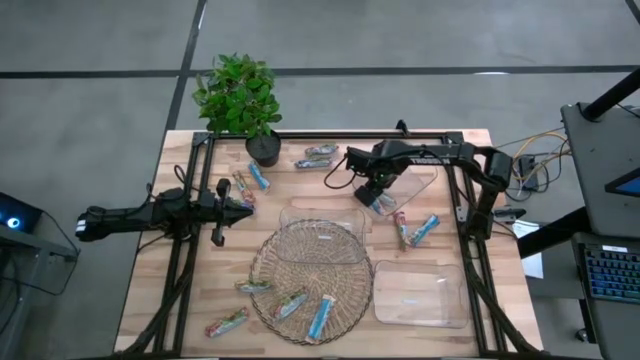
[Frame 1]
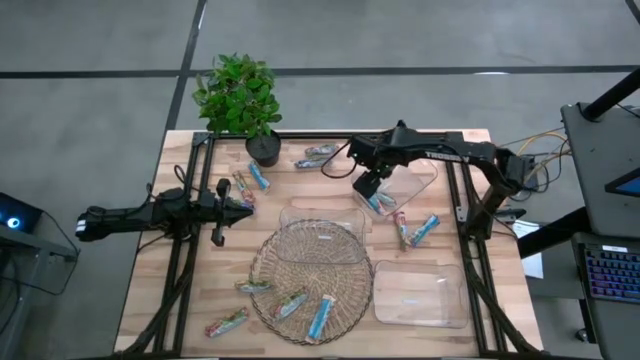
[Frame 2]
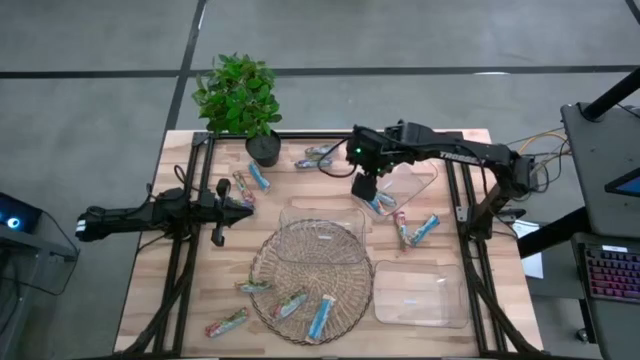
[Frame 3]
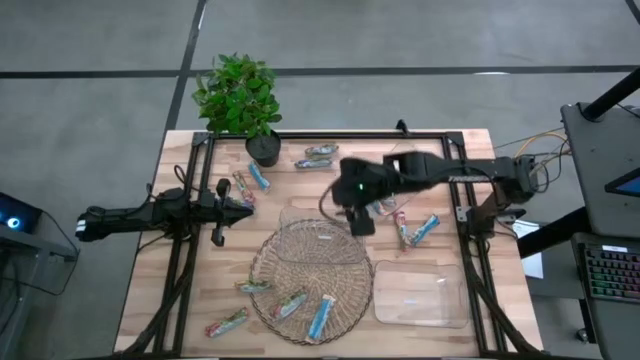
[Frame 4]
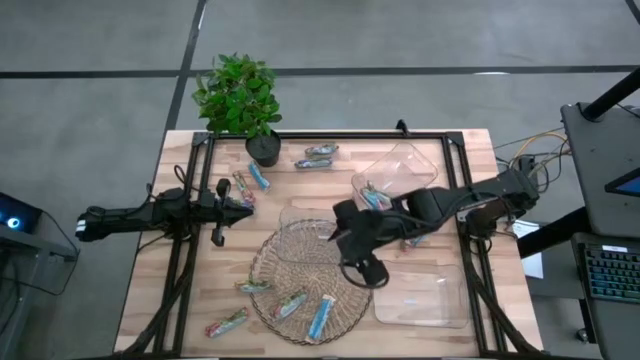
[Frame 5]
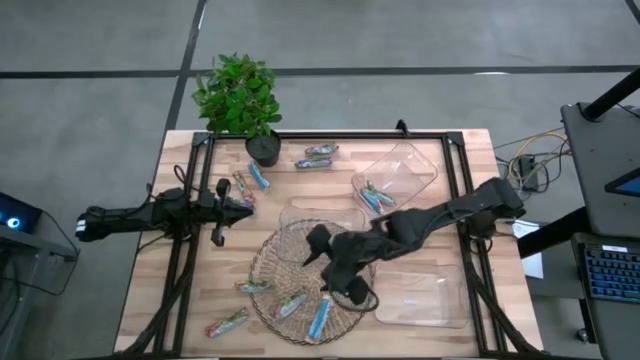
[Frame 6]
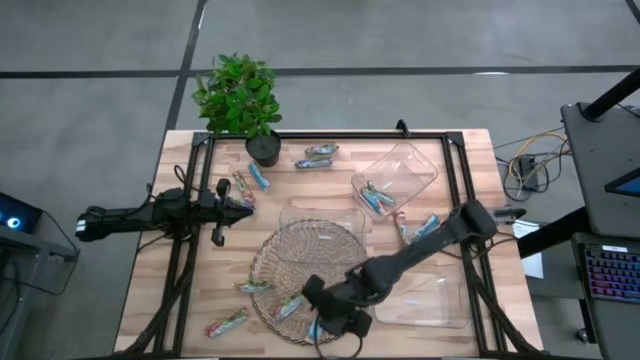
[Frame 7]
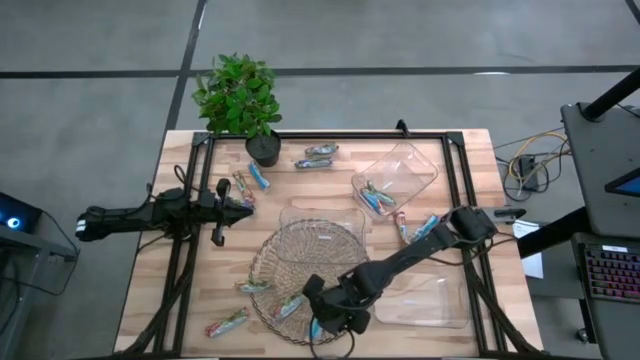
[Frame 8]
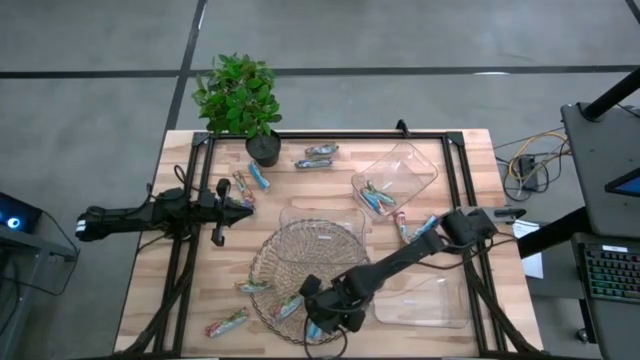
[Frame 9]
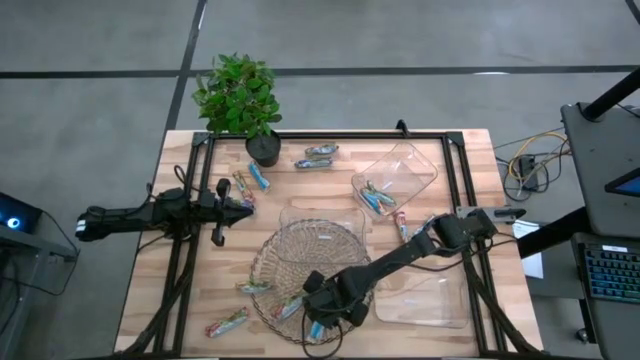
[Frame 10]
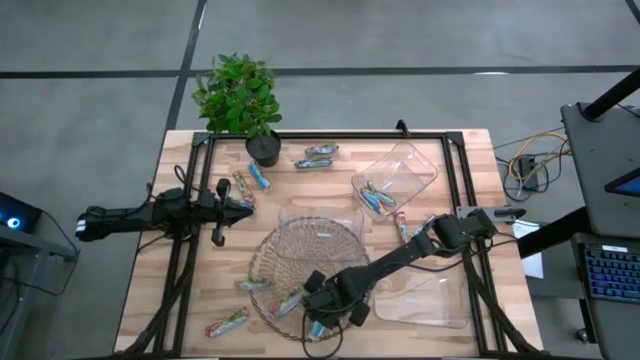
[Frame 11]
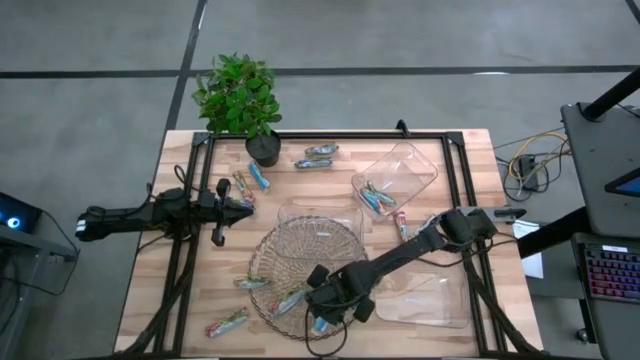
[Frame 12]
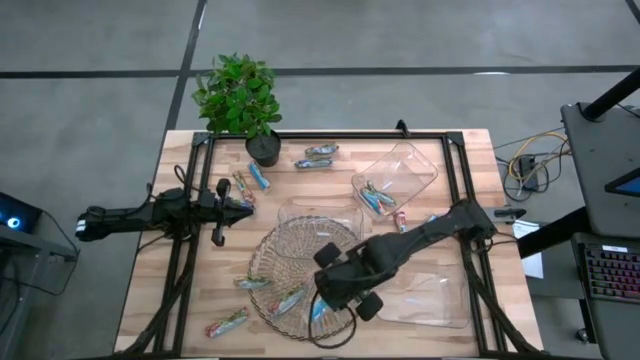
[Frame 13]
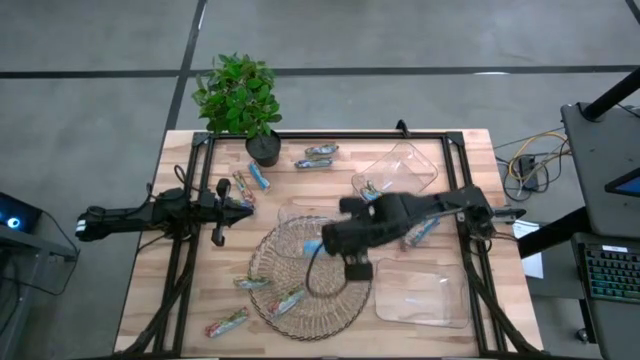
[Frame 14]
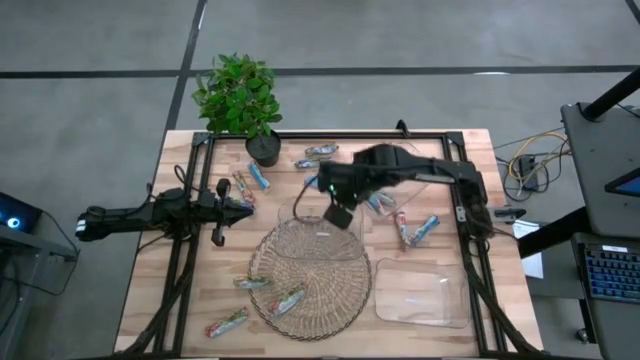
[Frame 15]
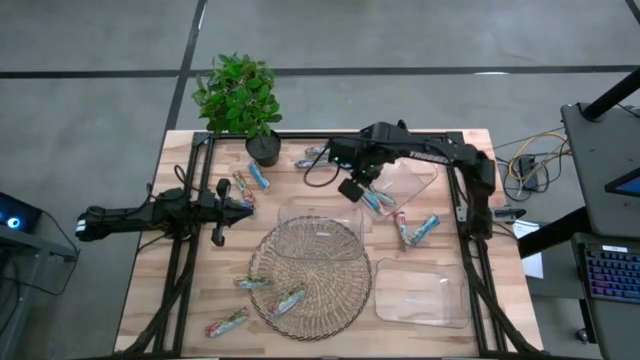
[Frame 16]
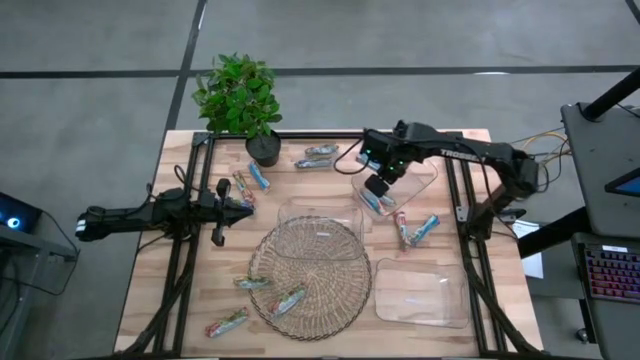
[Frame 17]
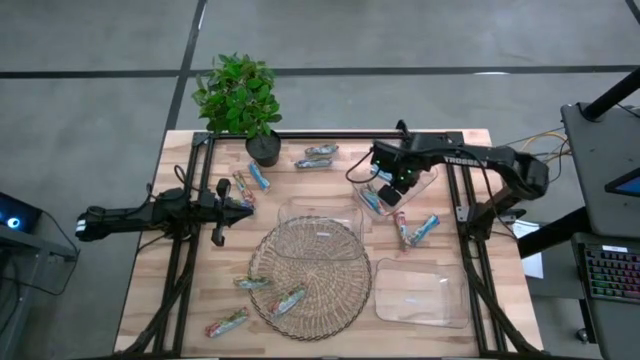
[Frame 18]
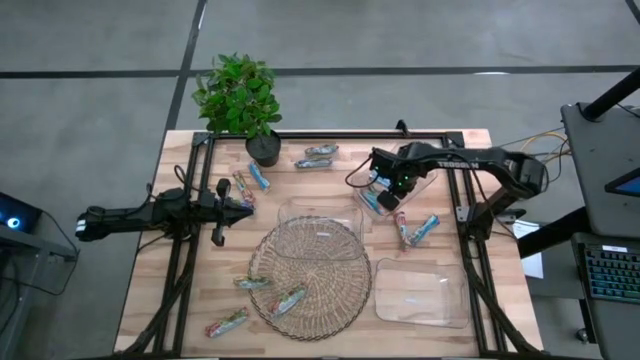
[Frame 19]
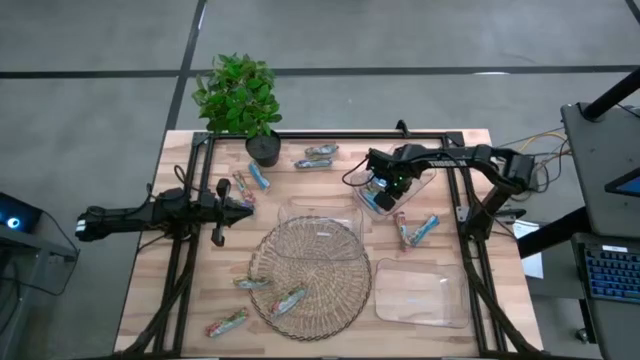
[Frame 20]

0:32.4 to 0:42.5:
Task: Pick and place Granola Bars by type
Put the yellow granola bar into the top transparent bin

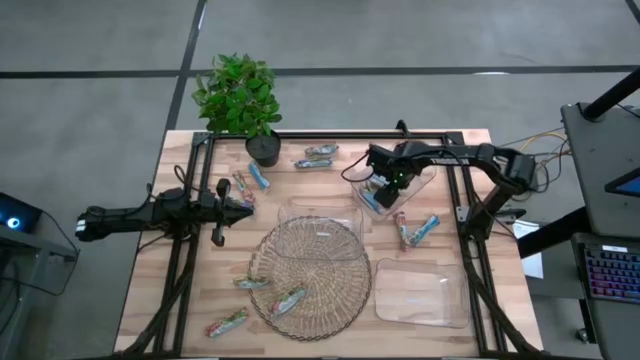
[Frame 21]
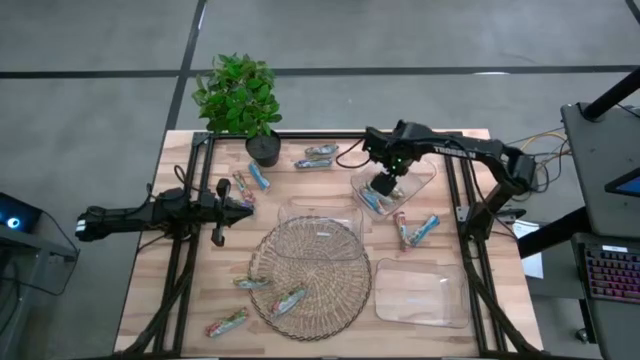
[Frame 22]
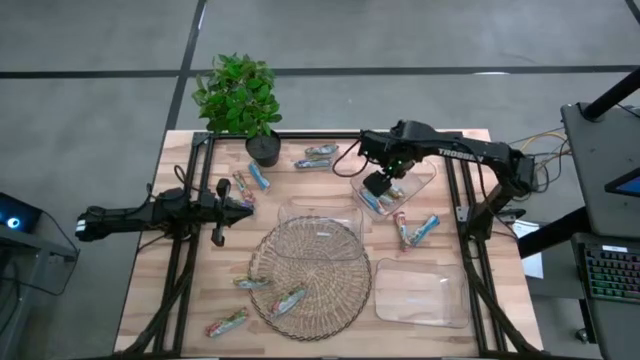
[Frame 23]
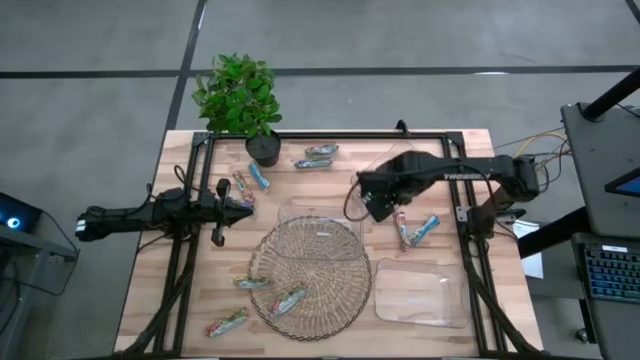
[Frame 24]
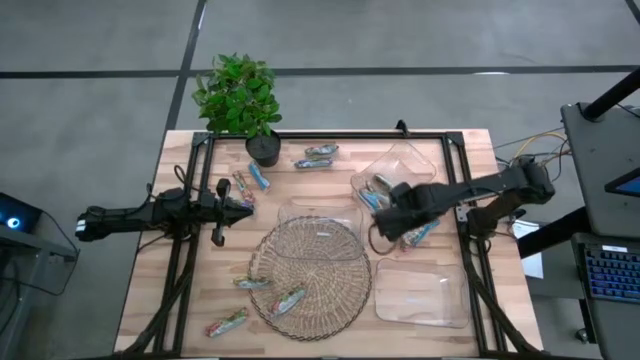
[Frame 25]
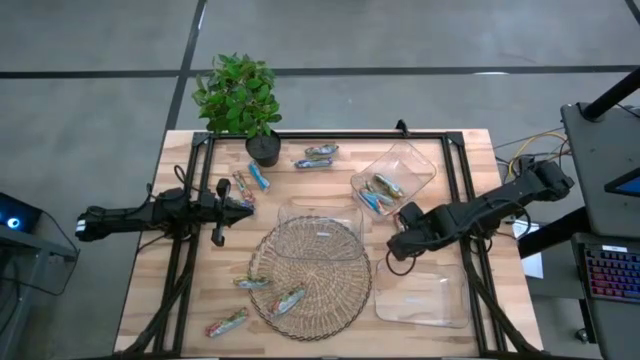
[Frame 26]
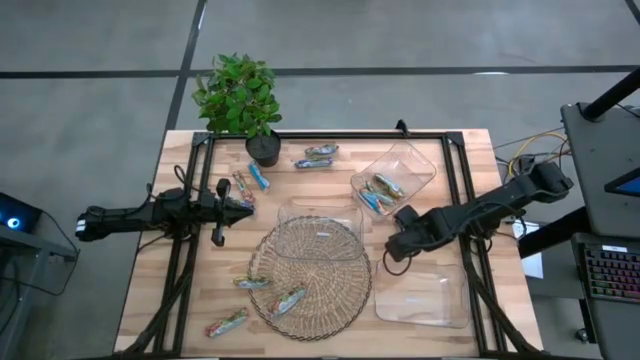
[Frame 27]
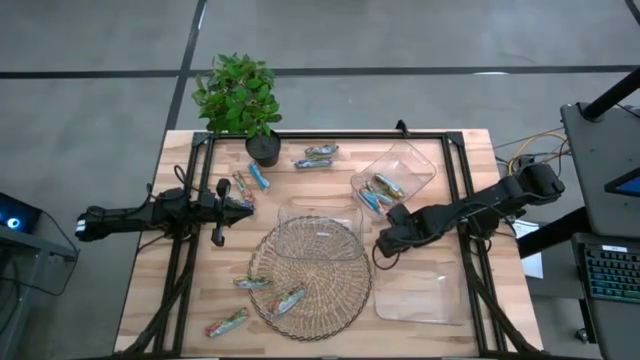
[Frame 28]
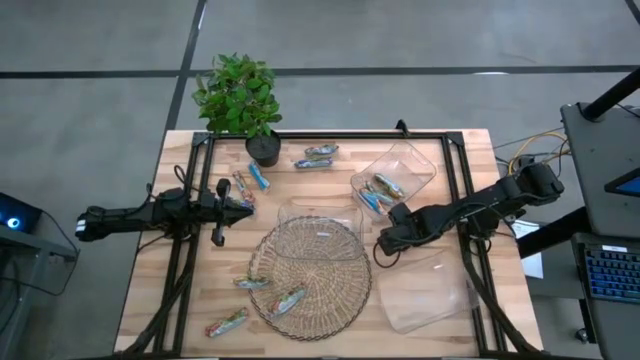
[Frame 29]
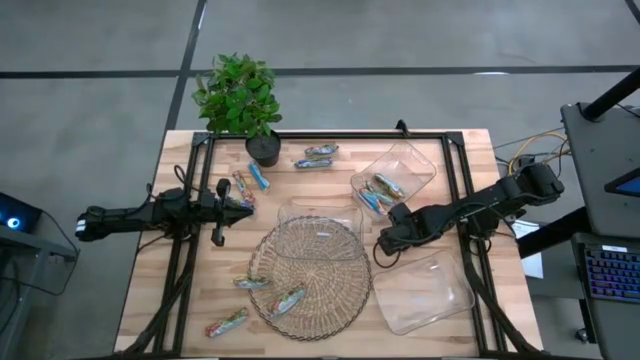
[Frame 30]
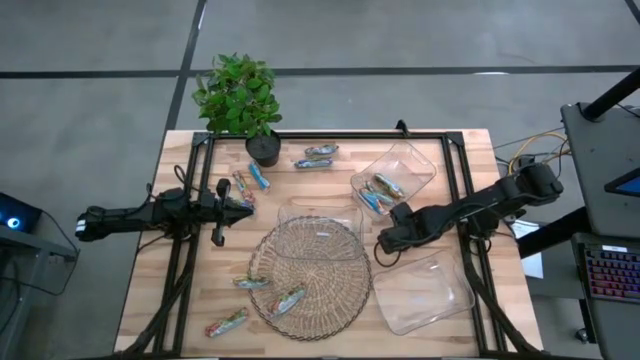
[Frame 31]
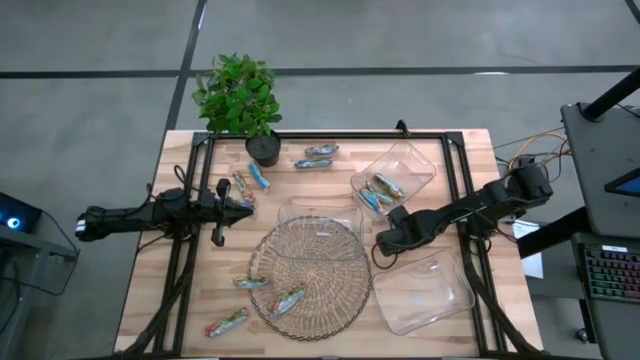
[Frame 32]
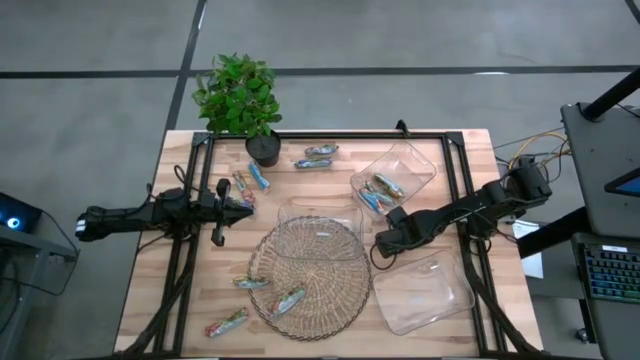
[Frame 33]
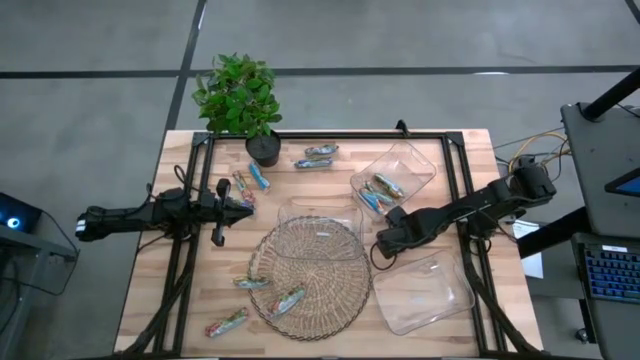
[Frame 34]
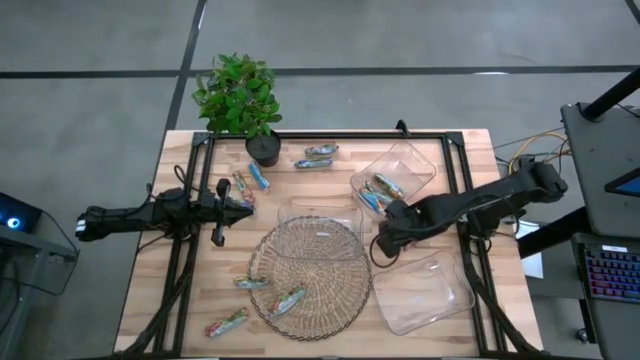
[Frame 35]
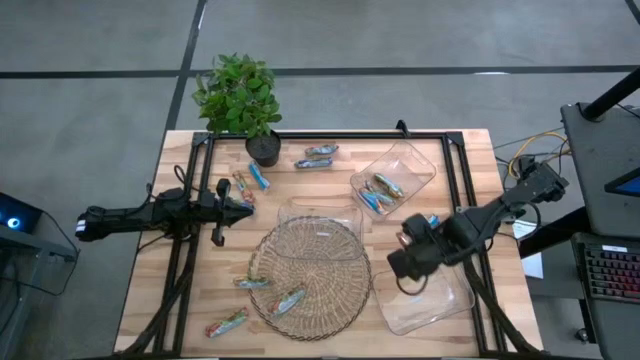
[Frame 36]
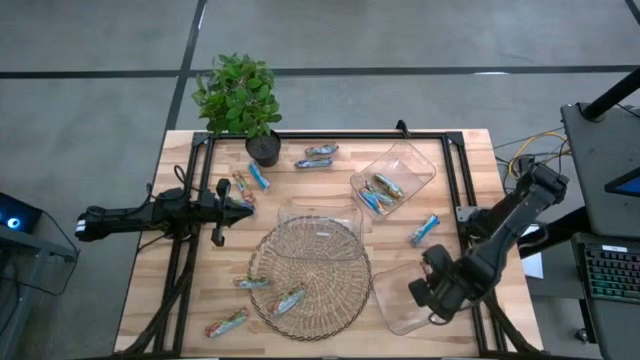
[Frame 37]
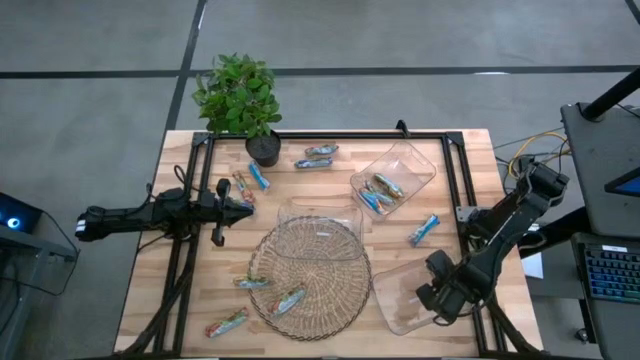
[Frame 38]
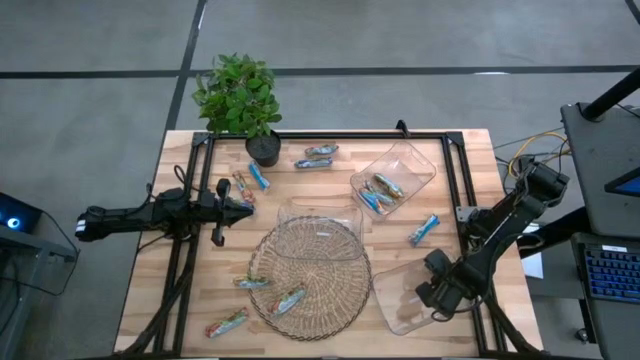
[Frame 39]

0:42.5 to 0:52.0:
Put the red granola bar into the bottom transparent bin

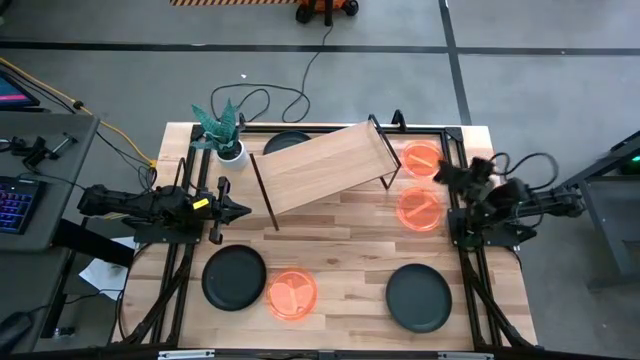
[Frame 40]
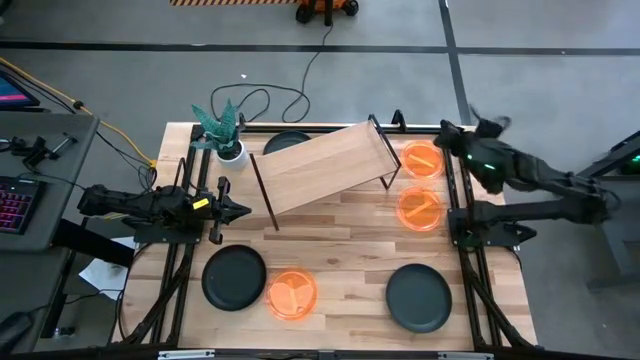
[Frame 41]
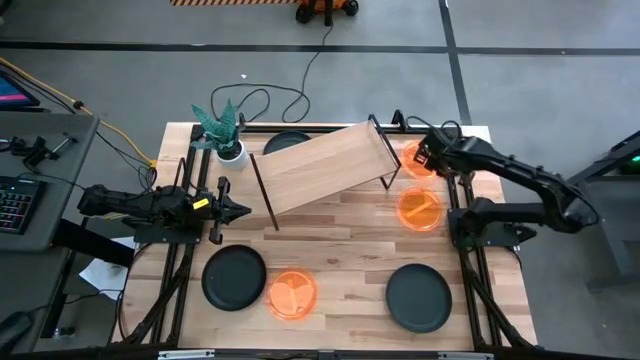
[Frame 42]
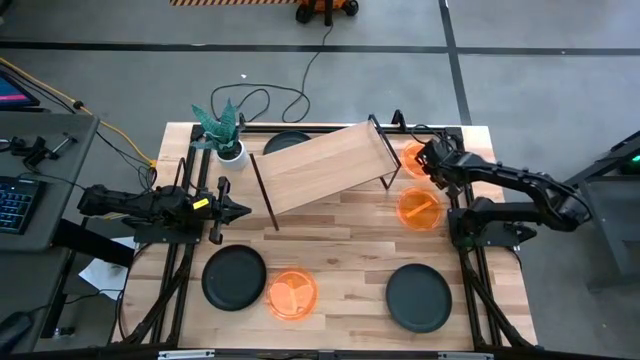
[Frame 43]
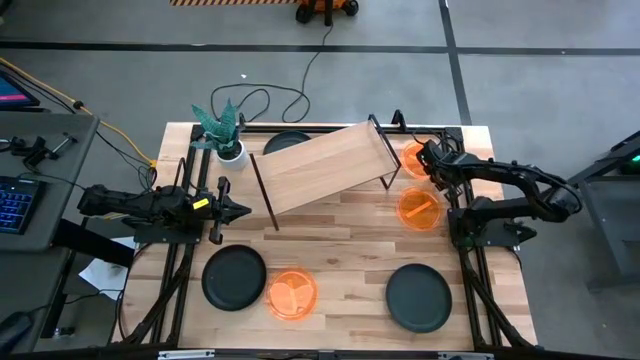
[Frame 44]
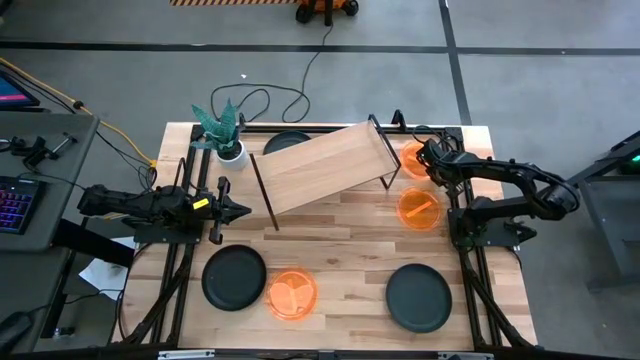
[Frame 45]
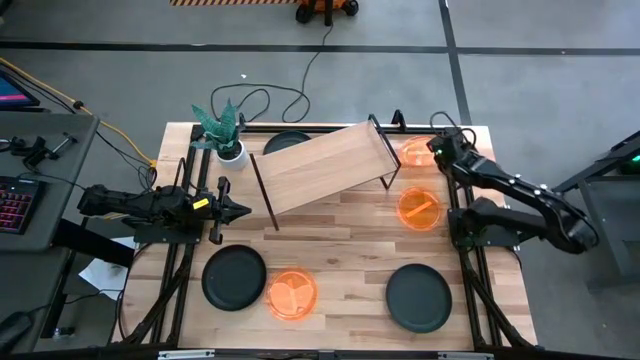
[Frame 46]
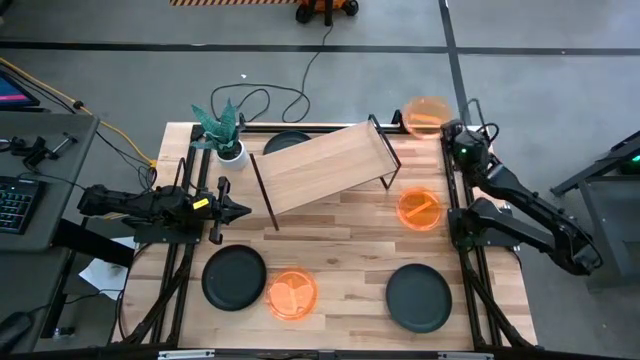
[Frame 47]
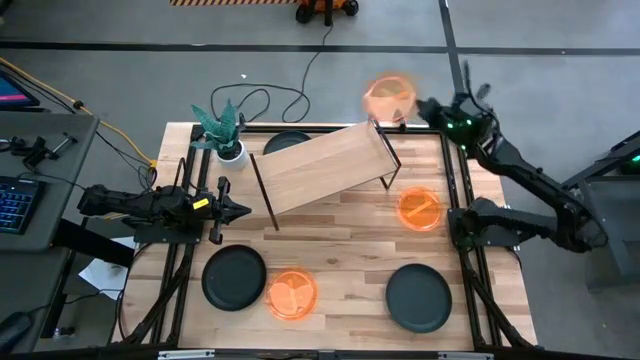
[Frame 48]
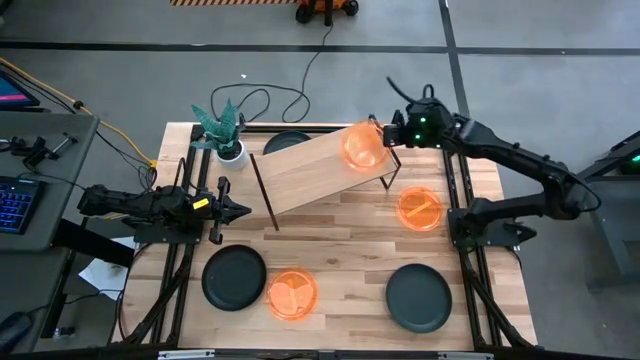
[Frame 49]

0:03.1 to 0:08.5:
Task: Place and stack plates onto a shelf
Put the top right orange plate on the shelf
